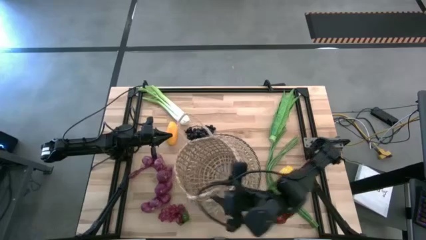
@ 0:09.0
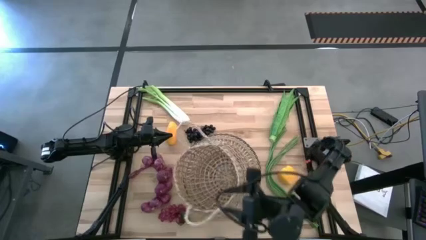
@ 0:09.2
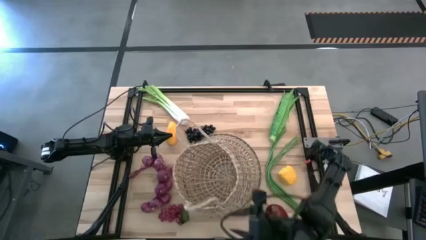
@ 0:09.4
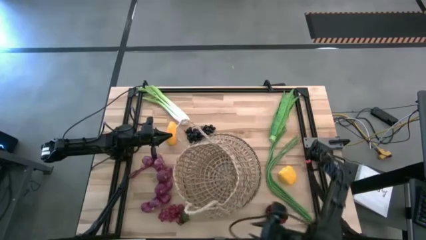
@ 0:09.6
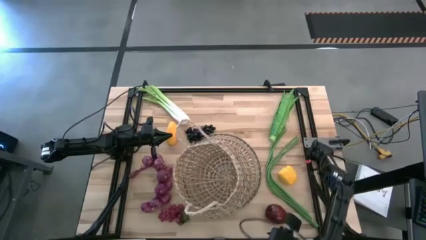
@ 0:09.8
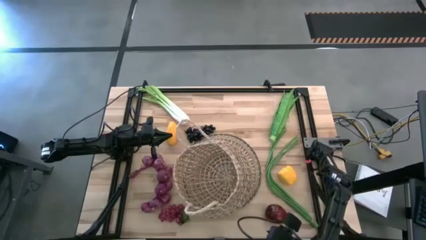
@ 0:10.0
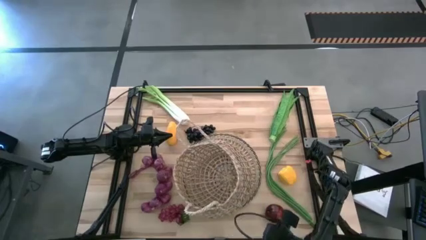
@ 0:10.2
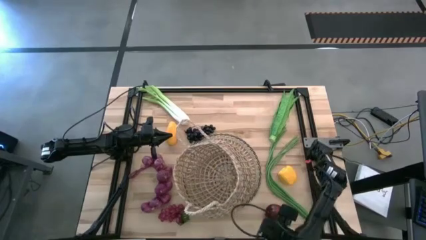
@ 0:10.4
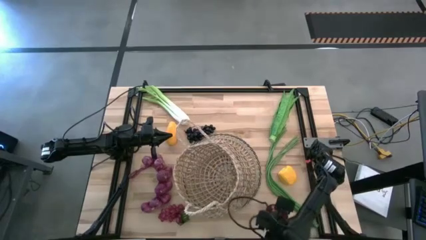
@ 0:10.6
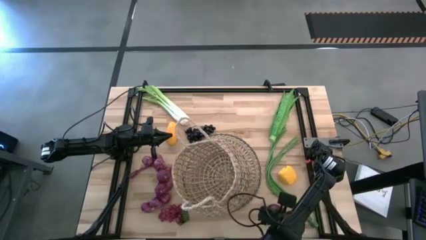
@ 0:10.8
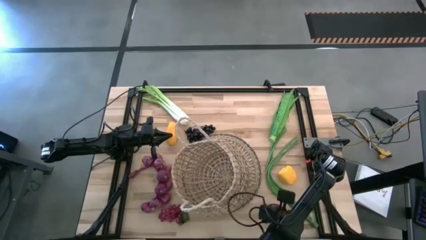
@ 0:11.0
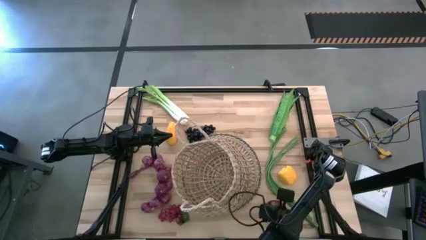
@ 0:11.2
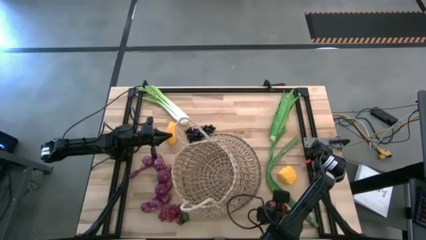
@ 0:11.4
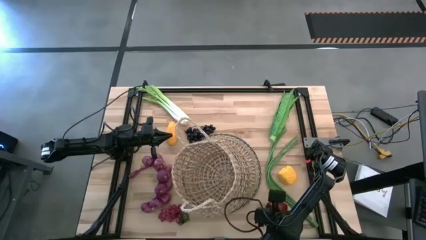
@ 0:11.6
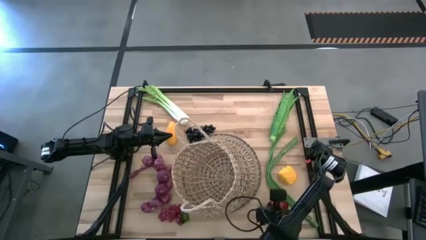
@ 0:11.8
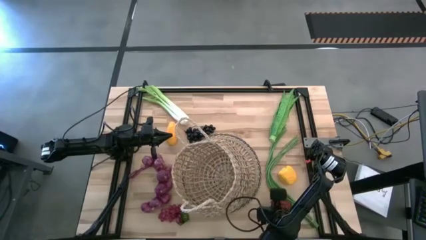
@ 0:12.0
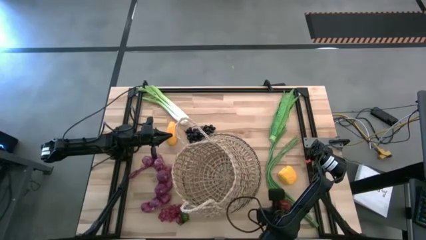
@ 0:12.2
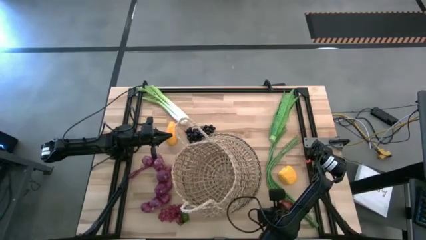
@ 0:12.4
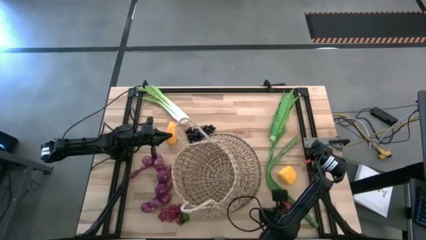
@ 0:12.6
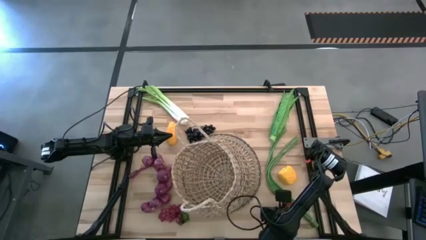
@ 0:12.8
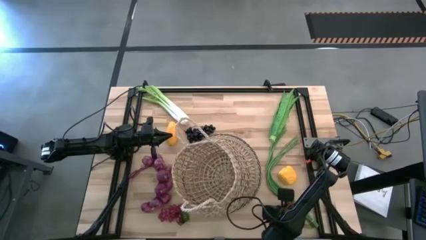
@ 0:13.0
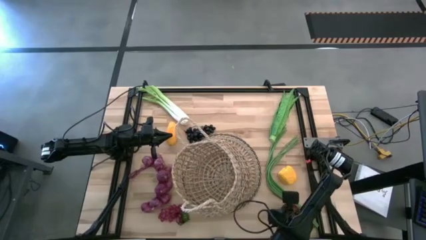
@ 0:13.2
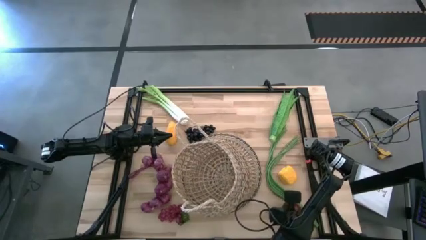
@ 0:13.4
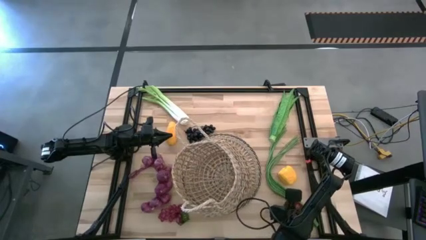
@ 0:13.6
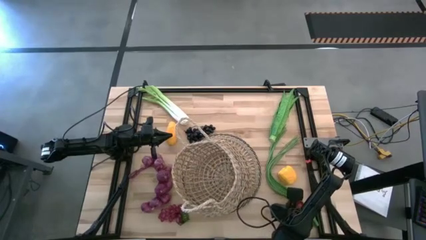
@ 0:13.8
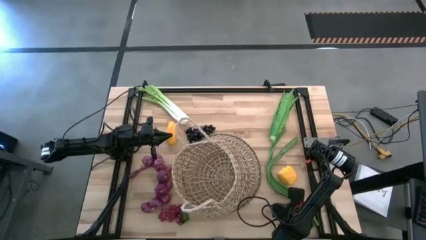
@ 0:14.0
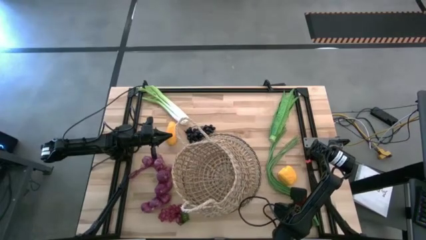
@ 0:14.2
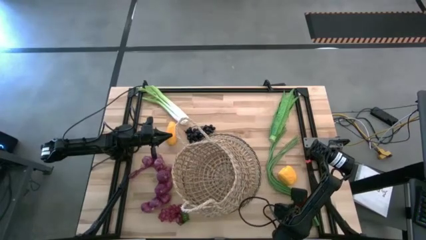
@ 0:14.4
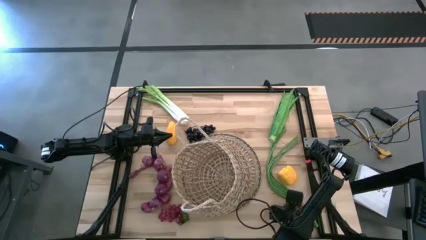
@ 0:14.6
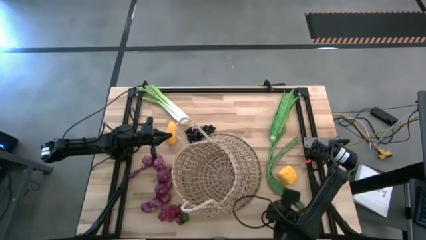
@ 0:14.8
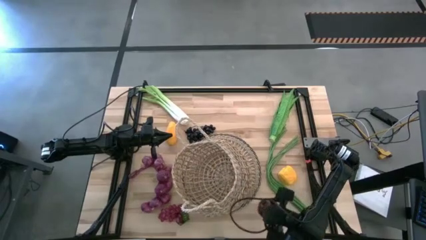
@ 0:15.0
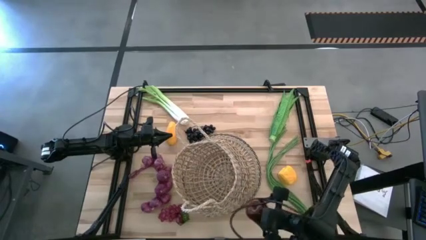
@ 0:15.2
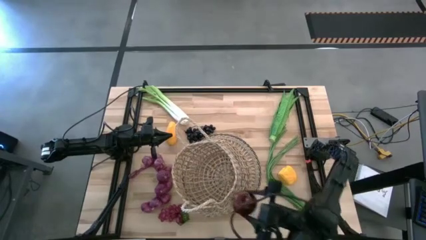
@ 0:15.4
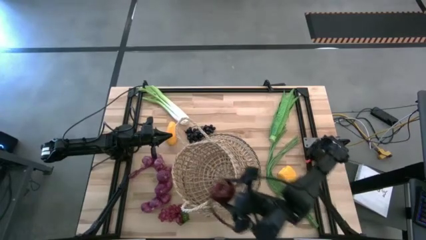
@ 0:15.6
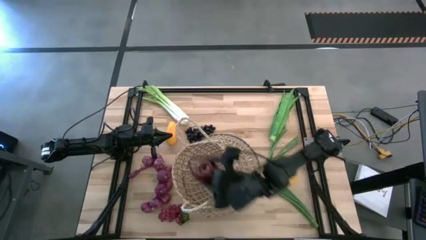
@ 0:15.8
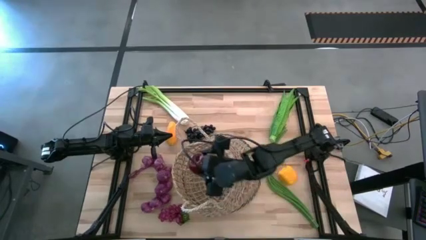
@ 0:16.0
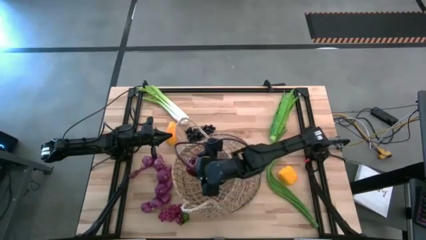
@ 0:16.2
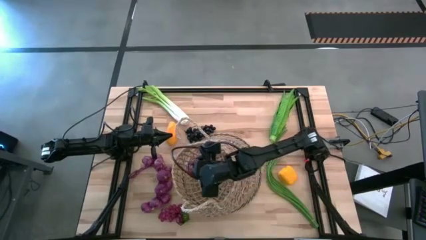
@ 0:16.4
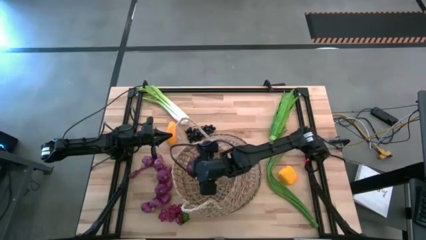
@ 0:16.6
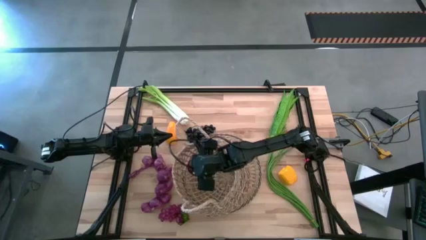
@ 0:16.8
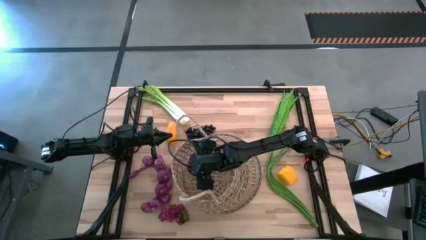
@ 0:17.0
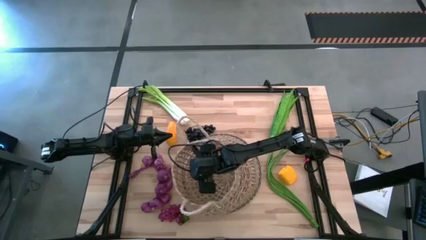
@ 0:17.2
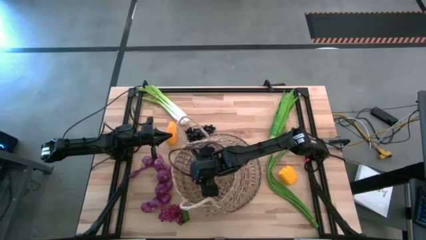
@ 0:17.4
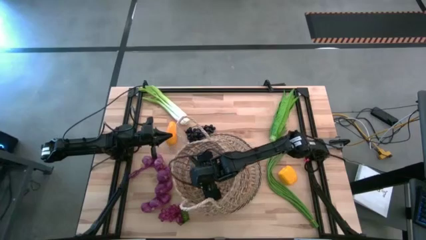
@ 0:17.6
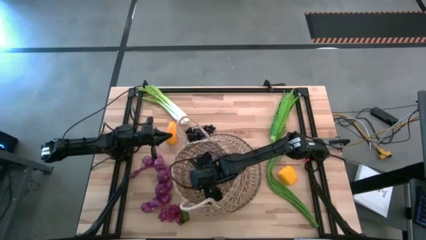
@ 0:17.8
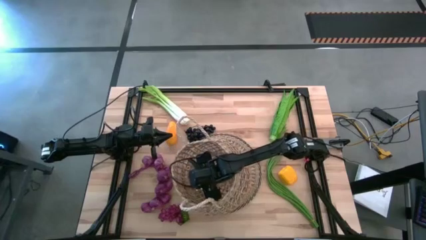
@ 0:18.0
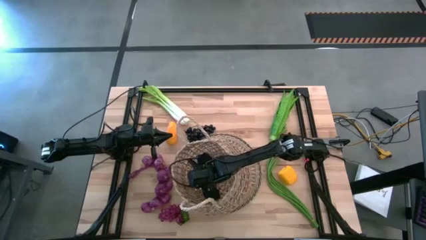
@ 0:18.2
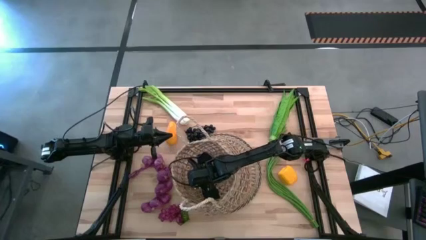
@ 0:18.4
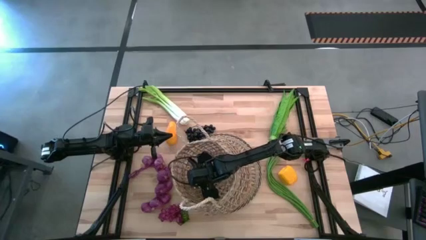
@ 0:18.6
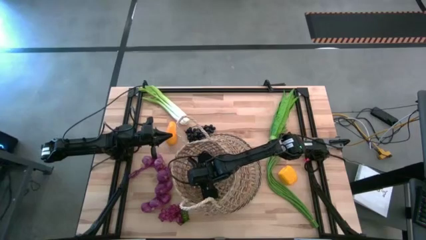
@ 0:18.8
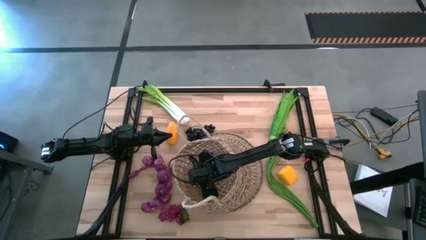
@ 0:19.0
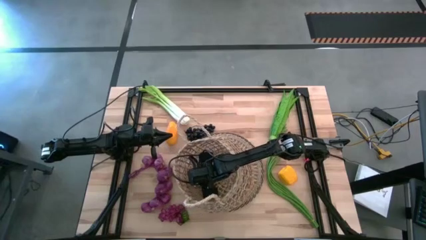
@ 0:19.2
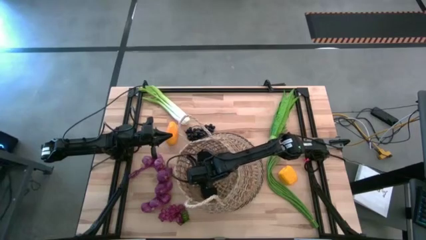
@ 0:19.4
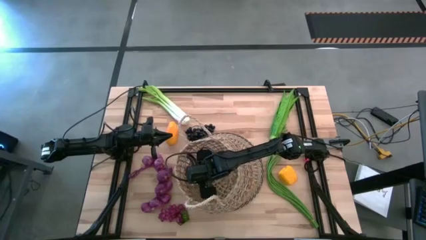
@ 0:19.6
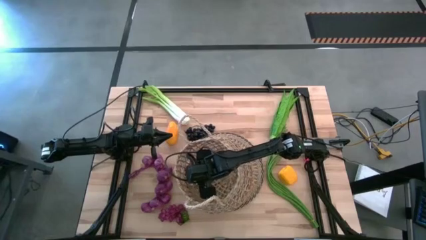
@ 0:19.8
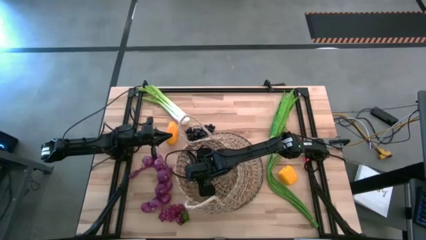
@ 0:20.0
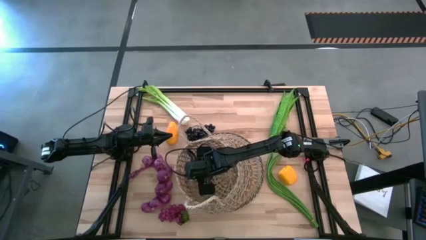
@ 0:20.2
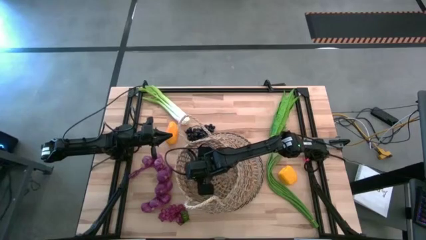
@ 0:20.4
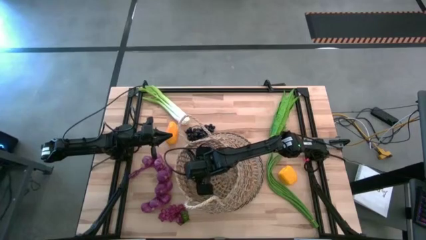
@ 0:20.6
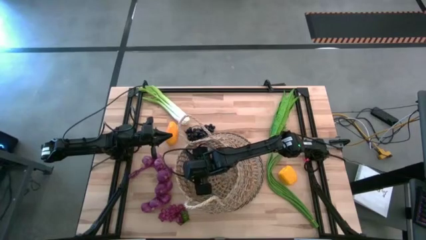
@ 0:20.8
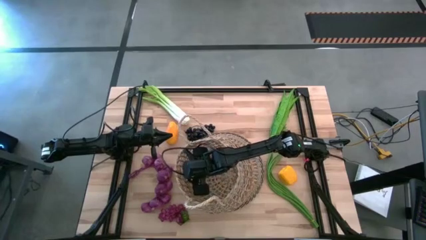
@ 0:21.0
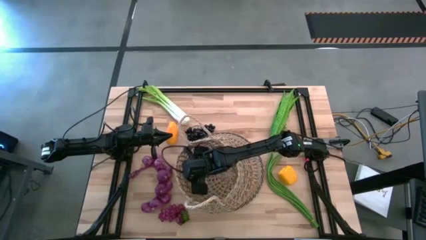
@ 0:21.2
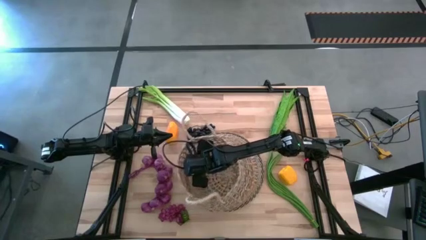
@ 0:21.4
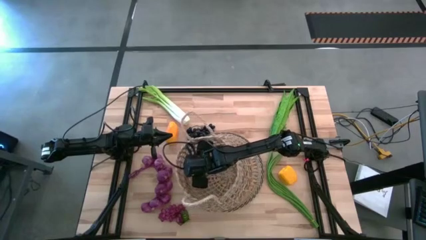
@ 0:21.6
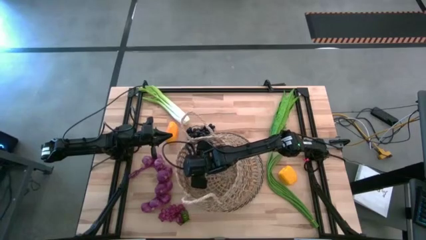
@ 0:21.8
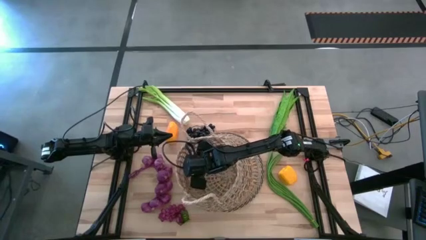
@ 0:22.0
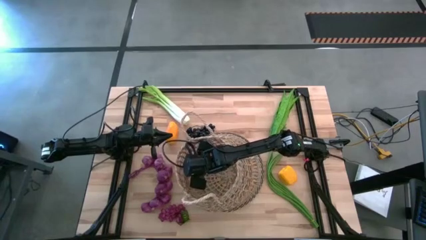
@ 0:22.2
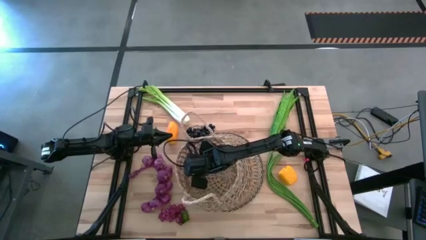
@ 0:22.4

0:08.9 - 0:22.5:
Task: Build produce basket
Put the apple into the basket
